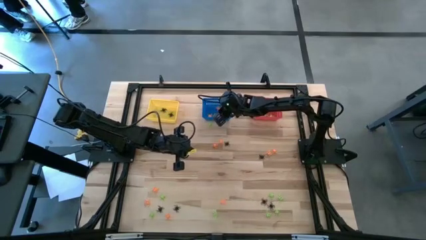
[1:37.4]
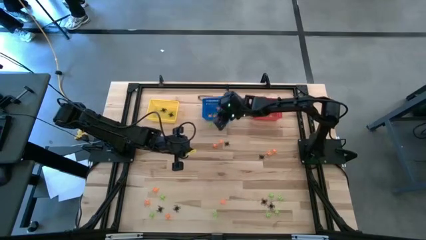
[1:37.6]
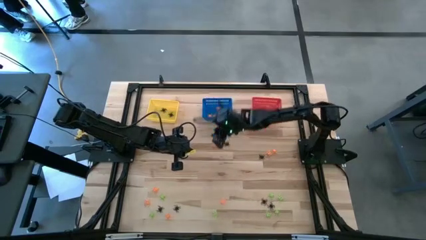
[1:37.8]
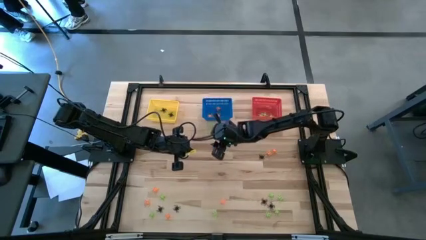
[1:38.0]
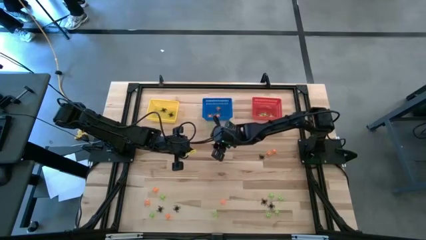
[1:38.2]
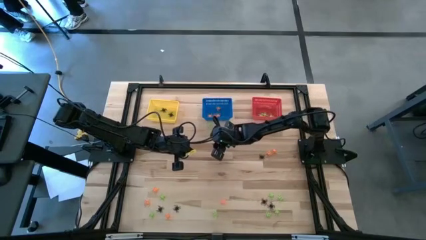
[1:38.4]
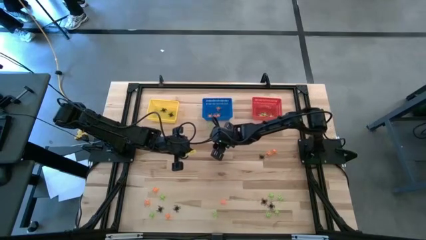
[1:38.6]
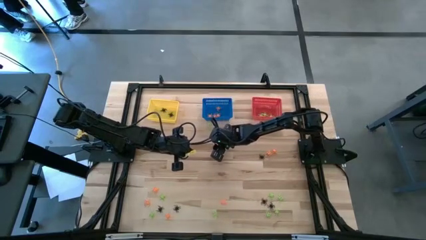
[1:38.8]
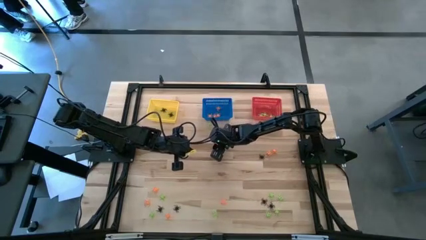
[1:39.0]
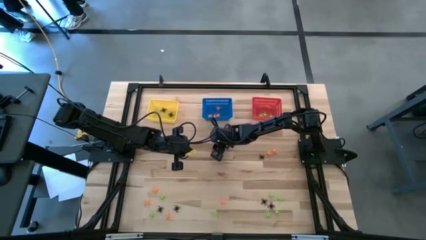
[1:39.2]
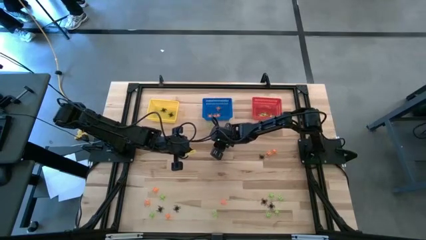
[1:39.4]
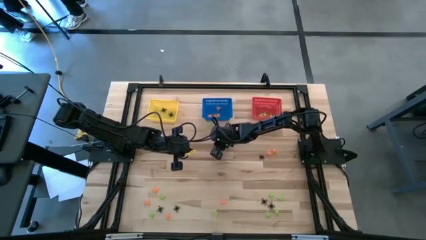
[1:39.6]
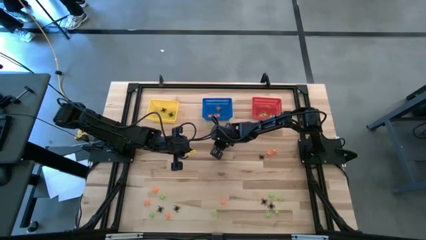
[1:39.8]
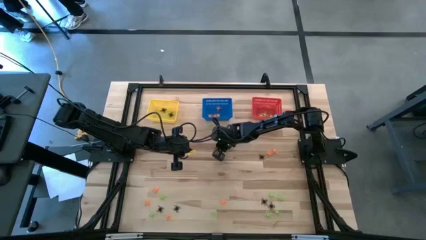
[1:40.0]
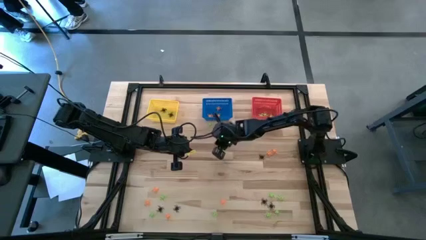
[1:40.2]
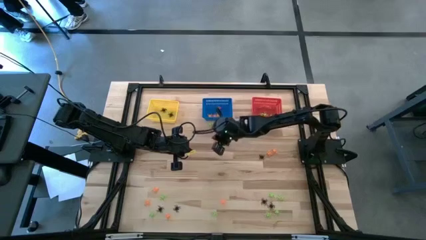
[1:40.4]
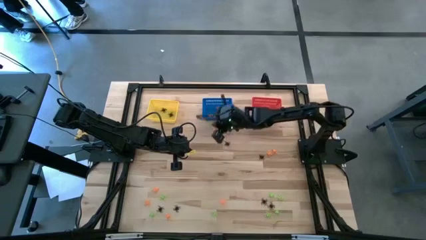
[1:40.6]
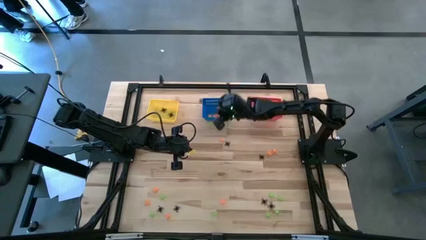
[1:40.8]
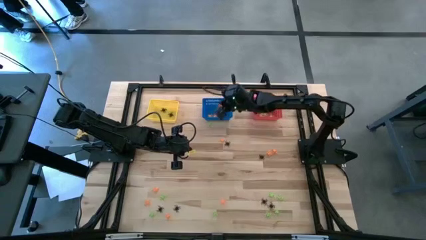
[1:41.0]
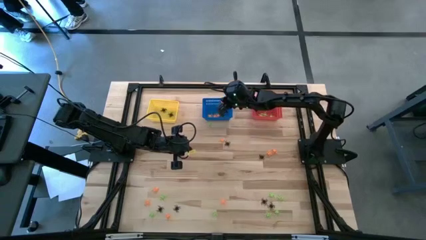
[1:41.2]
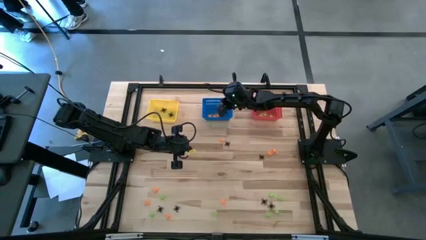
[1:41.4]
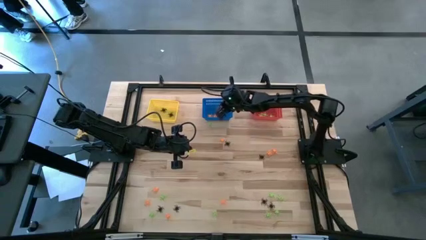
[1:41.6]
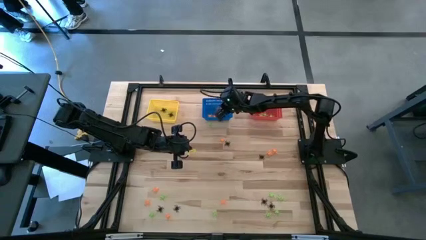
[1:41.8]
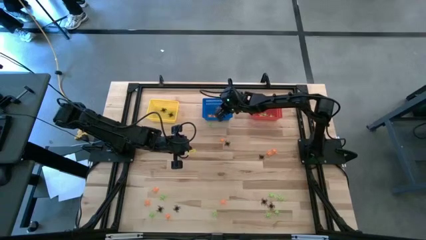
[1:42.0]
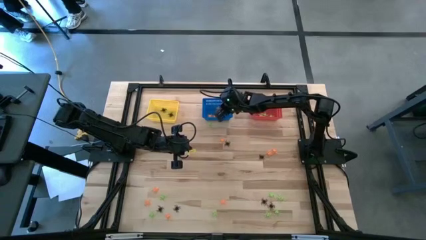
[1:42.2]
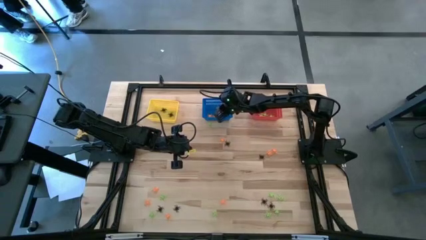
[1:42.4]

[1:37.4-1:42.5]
Task: Sort Halloween decoration
Put the orange spider toy into the blue basket

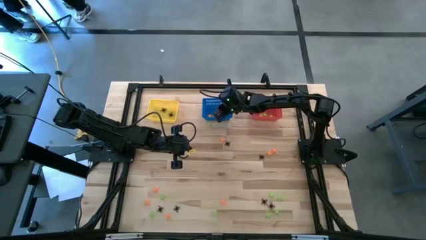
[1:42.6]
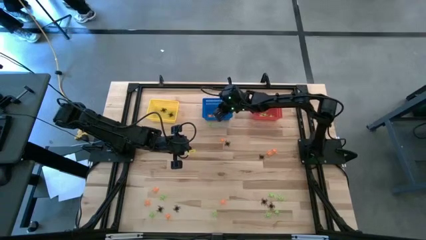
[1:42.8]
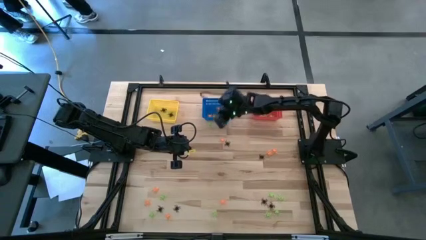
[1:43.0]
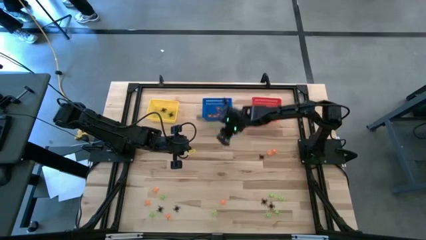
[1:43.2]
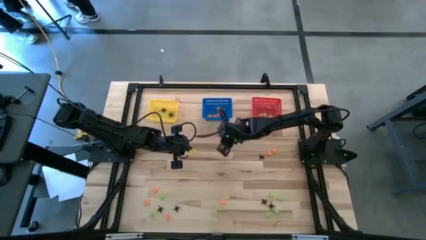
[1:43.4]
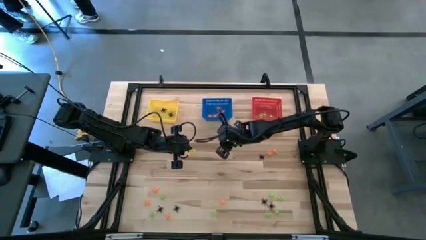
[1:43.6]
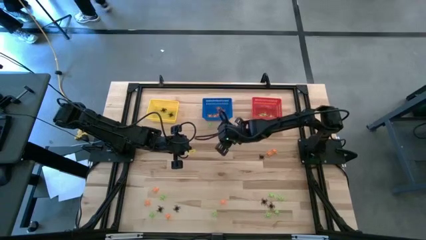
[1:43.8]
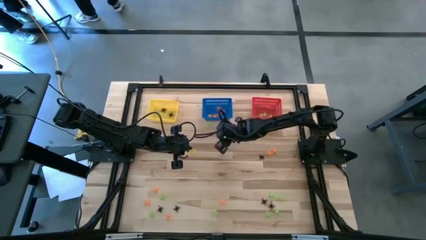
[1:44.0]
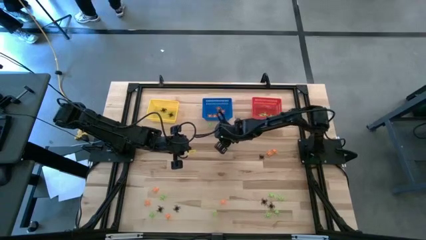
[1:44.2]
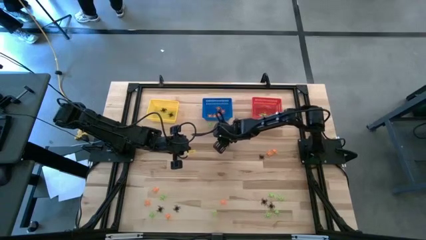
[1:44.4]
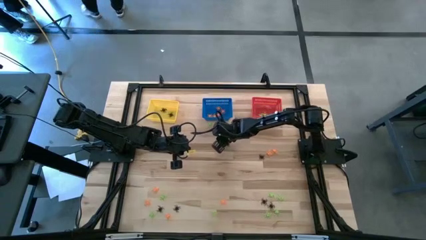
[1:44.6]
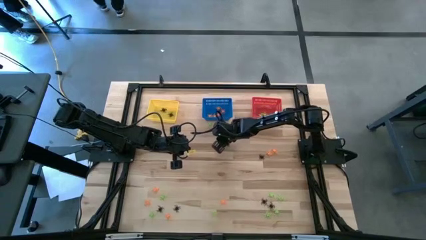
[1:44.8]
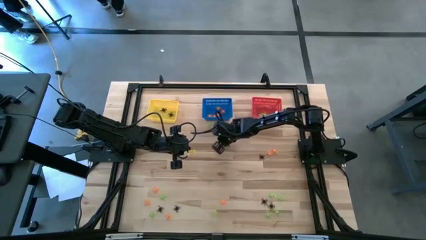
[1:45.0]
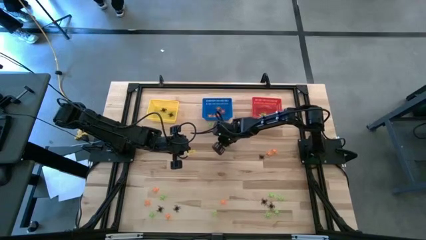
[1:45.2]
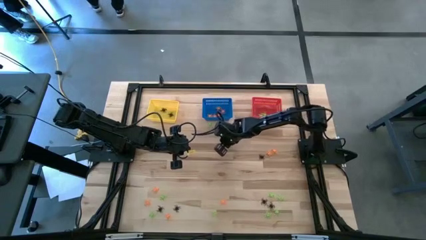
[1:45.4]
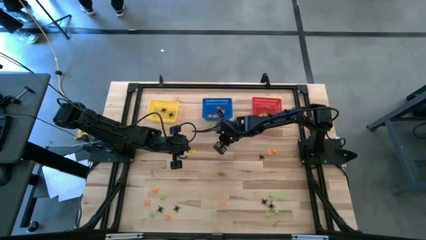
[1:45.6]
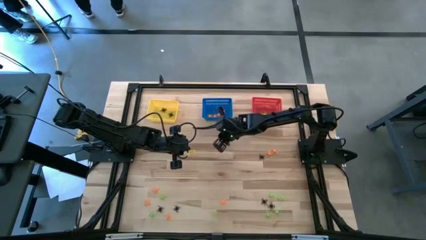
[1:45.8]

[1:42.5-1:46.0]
Put the orange spider toy into the blue basket

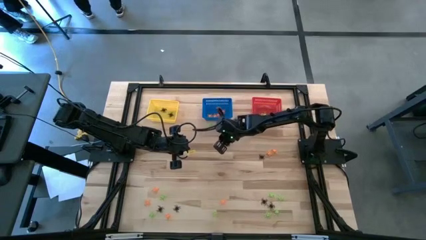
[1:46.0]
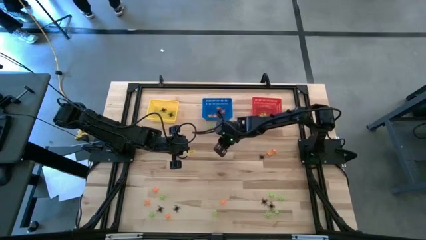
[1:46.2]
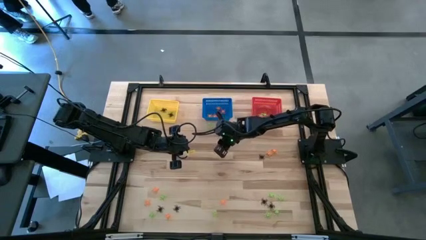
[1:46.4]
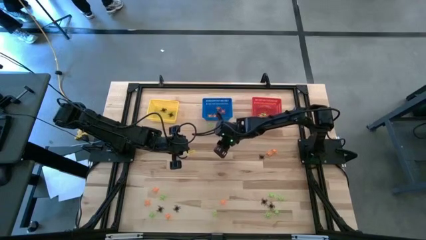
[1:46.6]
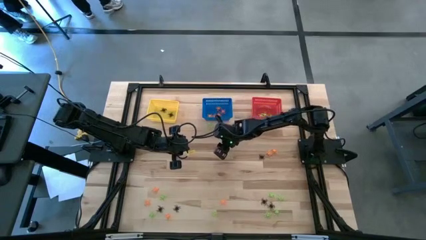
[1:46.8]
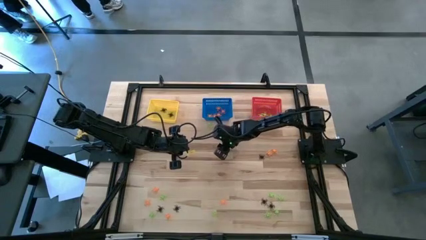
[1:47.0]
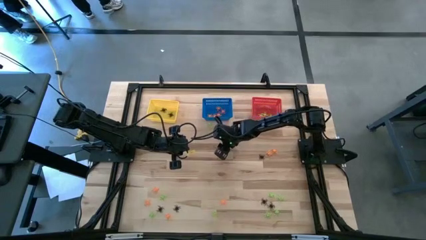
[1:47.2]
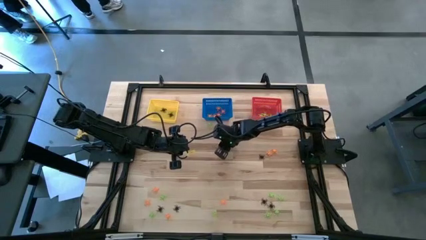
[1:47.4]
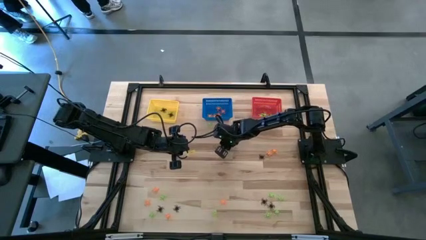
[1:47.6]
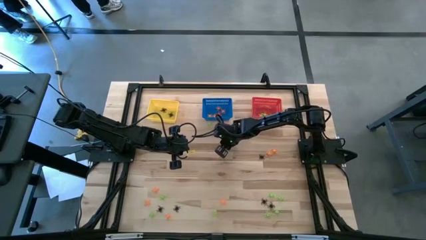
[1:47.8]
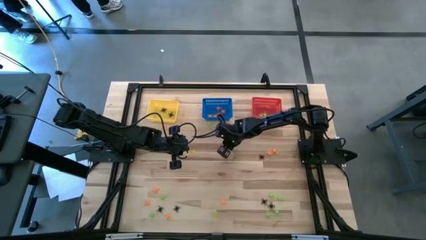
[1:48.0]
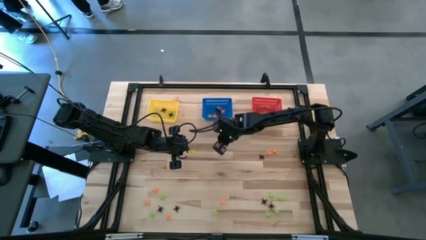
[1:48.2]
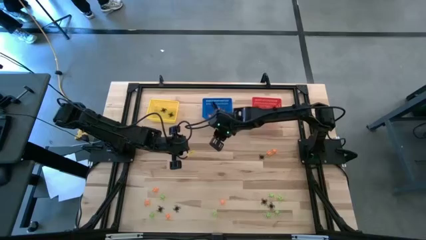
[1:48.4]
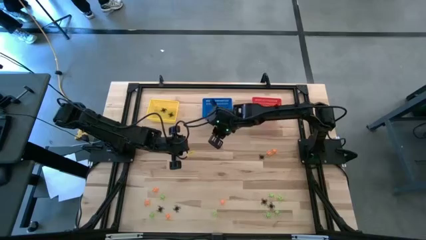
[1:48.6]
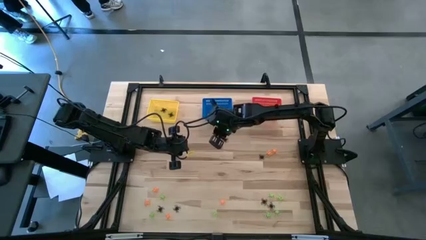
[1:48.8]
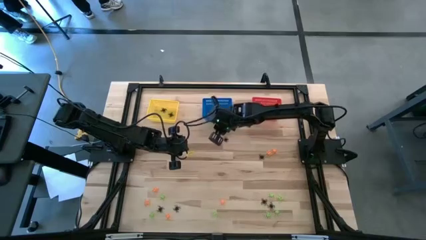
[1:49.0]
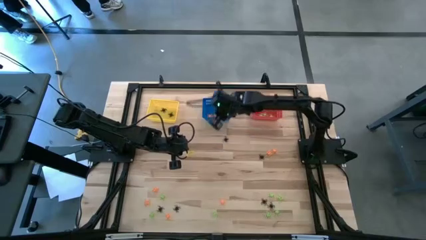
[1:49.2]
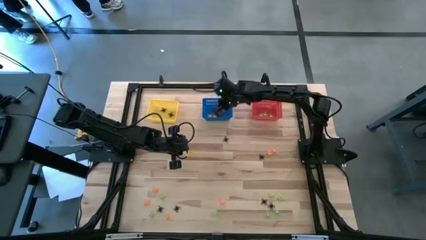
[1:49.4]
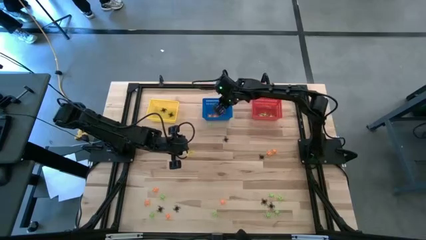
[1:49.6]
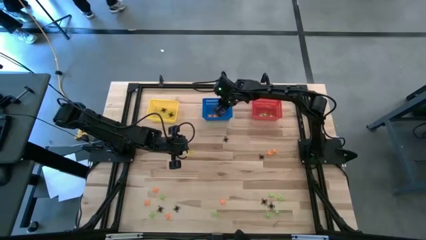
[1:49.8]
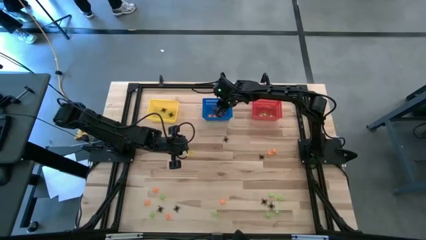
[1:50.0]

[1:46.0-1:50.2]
Put the orange spider toy into the blue basket
